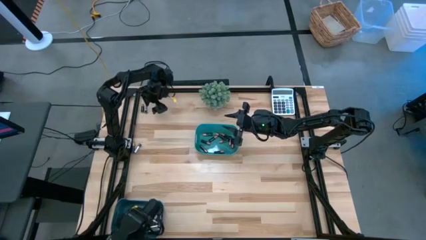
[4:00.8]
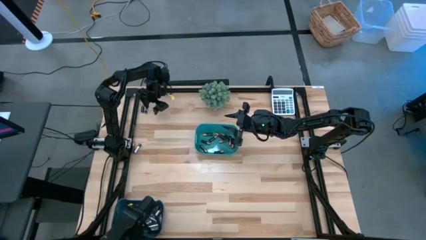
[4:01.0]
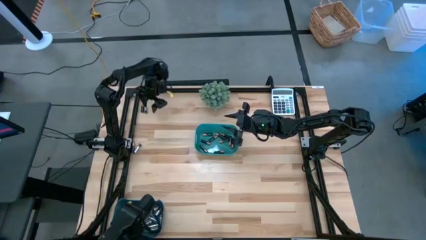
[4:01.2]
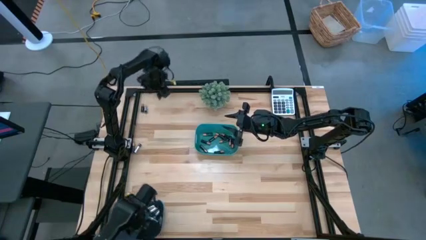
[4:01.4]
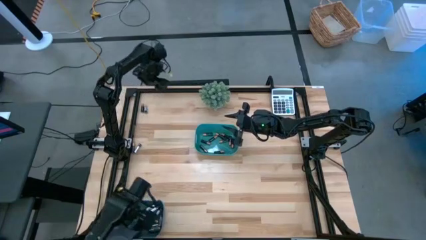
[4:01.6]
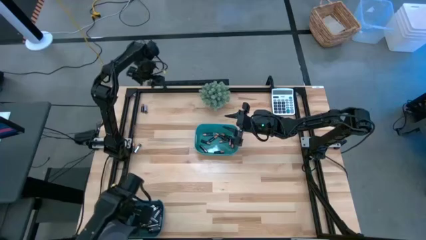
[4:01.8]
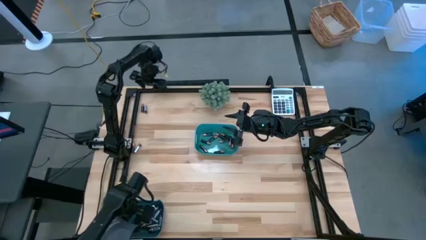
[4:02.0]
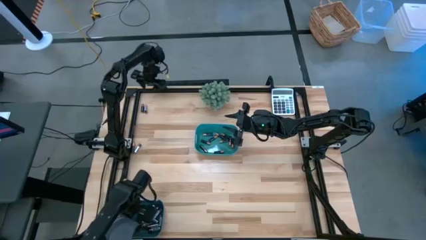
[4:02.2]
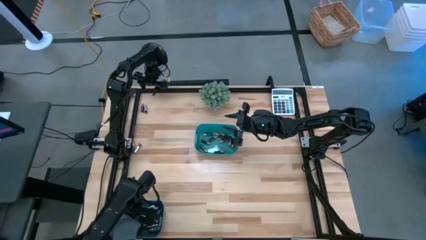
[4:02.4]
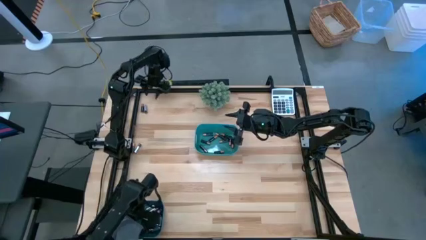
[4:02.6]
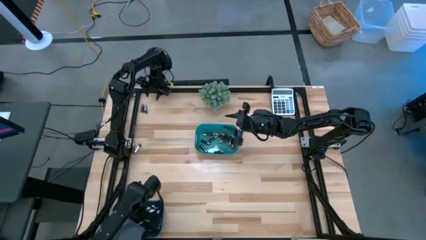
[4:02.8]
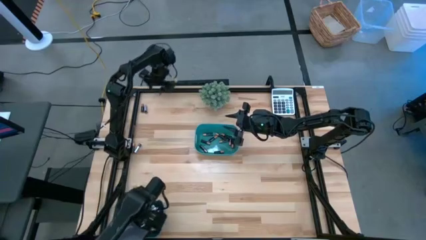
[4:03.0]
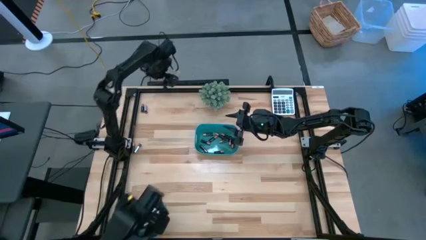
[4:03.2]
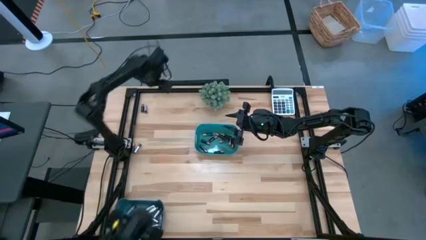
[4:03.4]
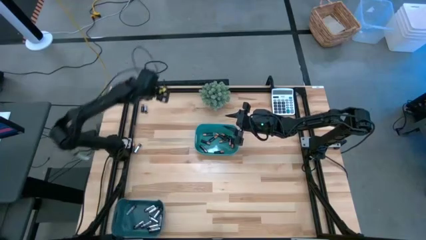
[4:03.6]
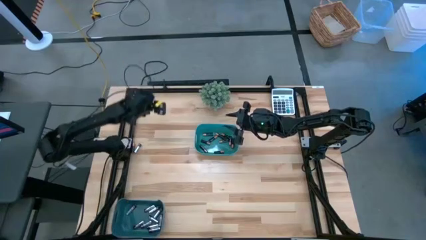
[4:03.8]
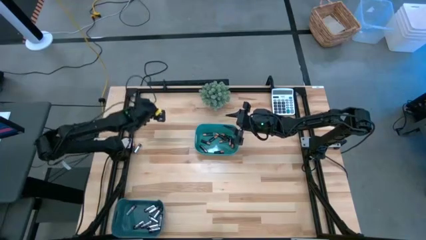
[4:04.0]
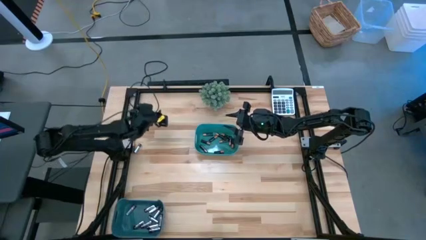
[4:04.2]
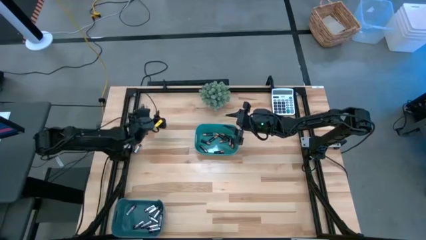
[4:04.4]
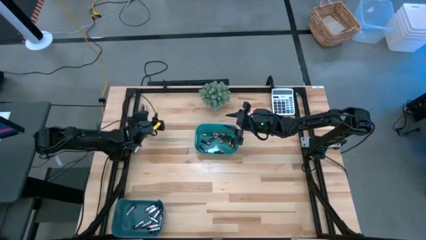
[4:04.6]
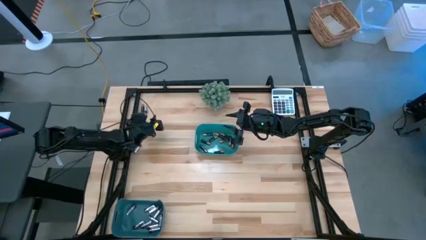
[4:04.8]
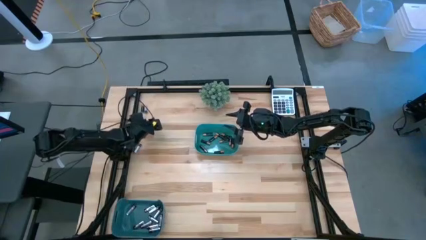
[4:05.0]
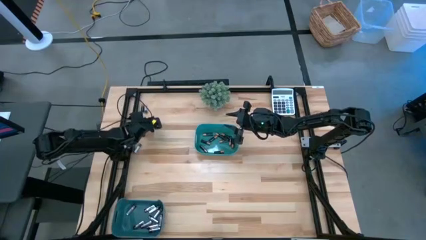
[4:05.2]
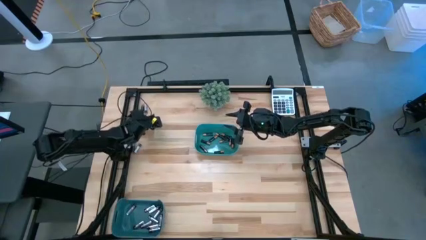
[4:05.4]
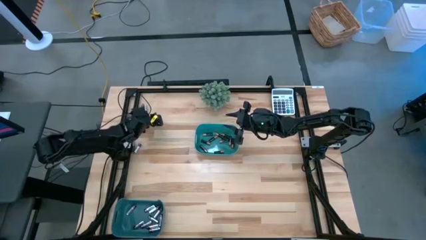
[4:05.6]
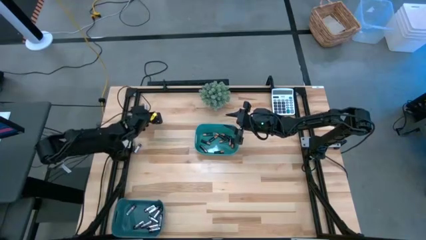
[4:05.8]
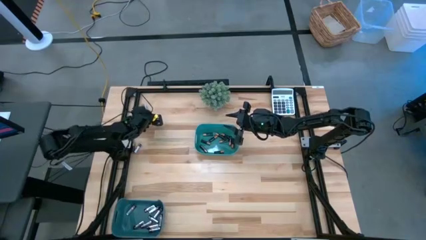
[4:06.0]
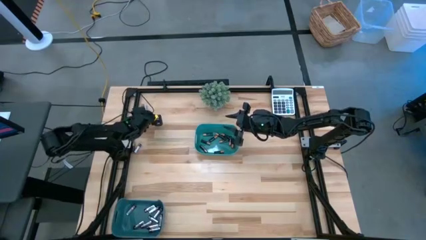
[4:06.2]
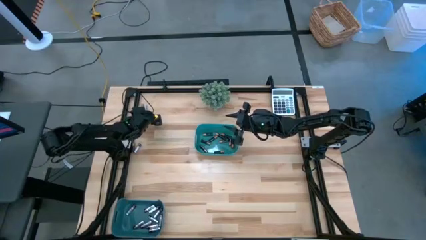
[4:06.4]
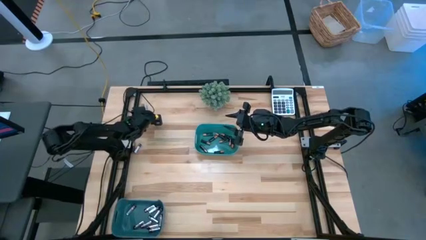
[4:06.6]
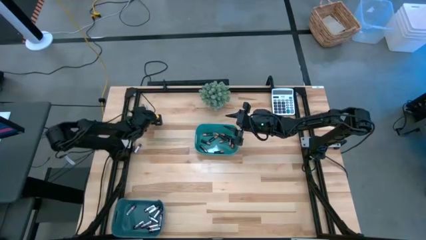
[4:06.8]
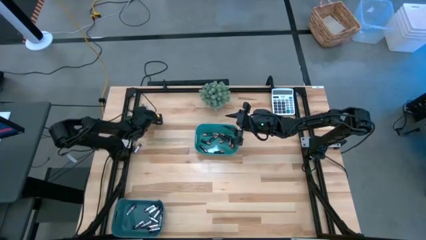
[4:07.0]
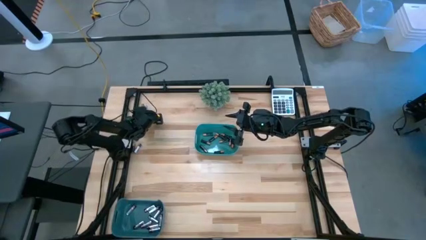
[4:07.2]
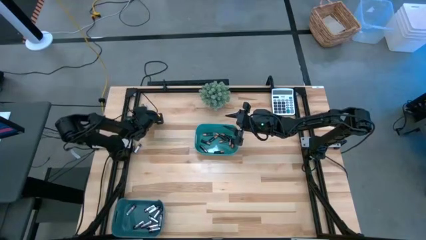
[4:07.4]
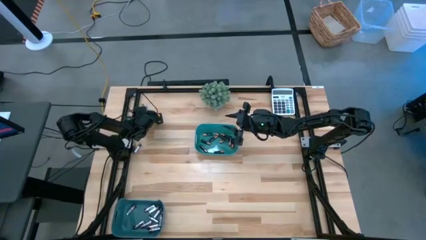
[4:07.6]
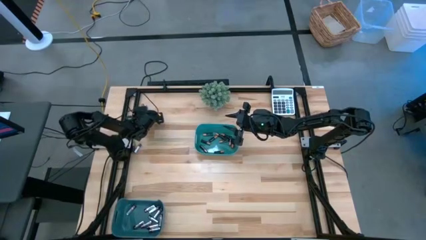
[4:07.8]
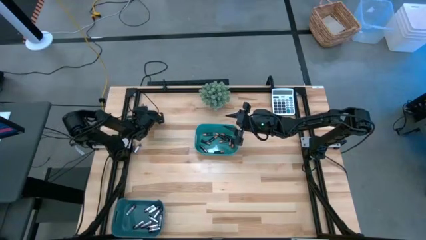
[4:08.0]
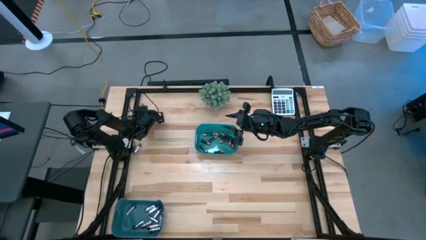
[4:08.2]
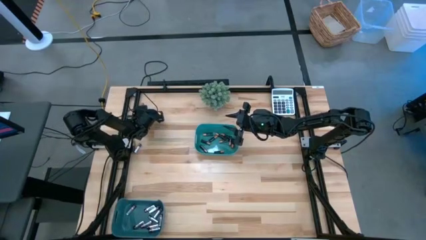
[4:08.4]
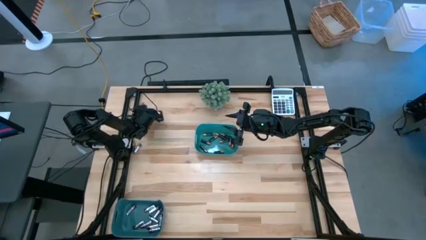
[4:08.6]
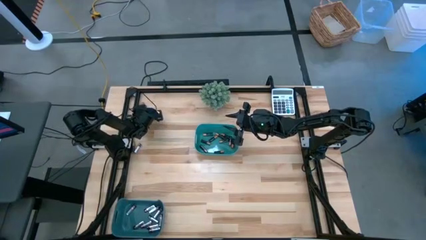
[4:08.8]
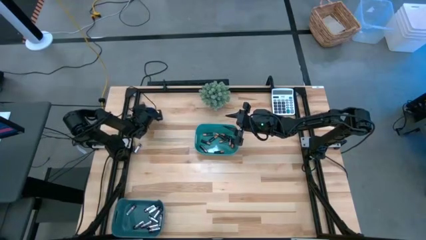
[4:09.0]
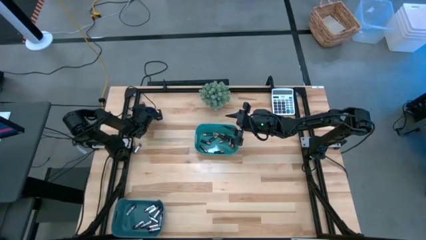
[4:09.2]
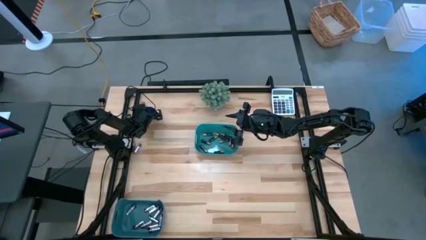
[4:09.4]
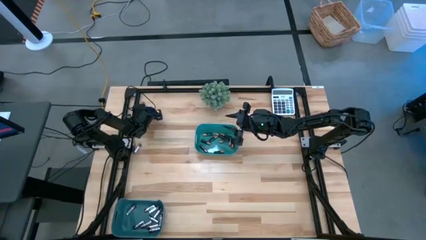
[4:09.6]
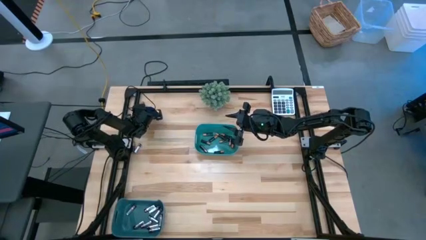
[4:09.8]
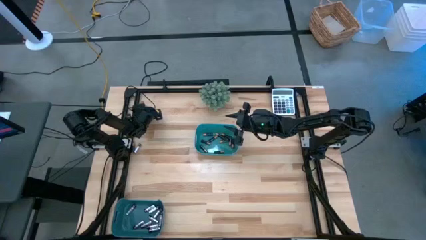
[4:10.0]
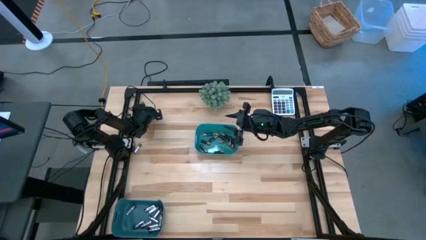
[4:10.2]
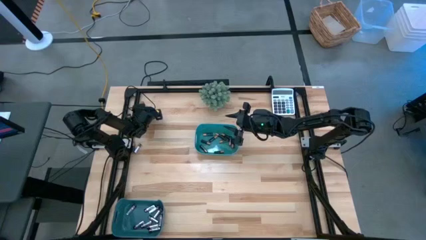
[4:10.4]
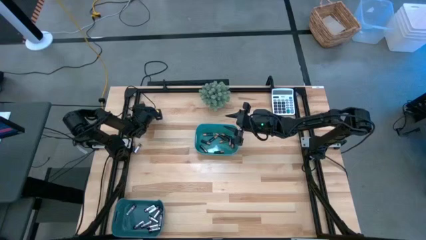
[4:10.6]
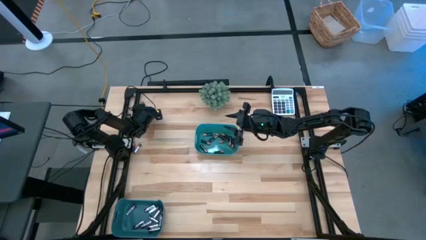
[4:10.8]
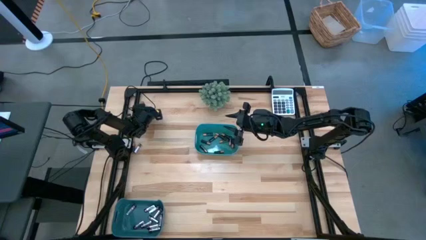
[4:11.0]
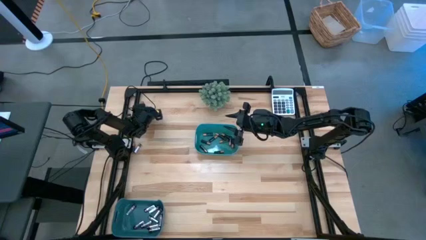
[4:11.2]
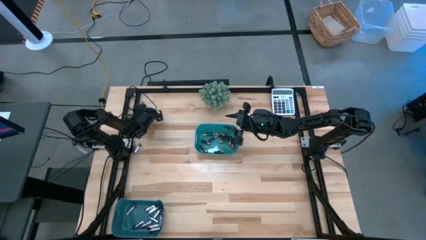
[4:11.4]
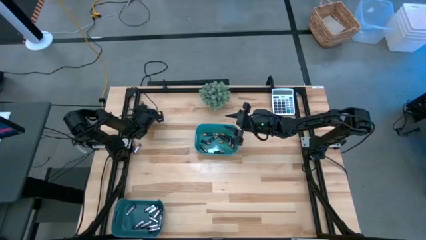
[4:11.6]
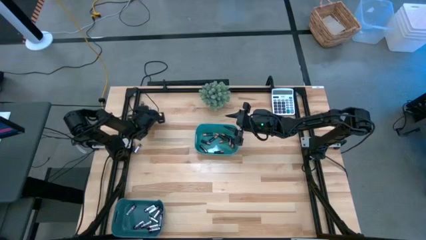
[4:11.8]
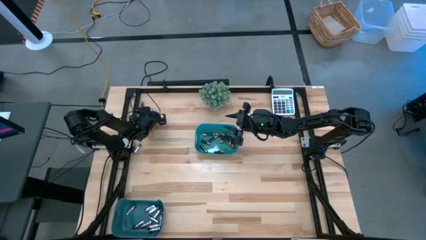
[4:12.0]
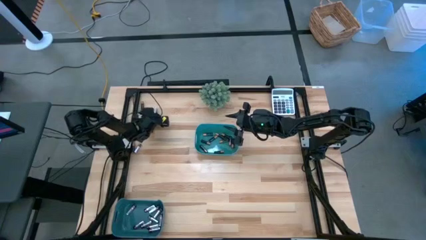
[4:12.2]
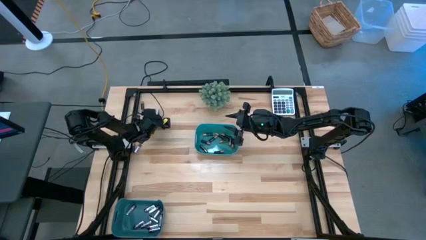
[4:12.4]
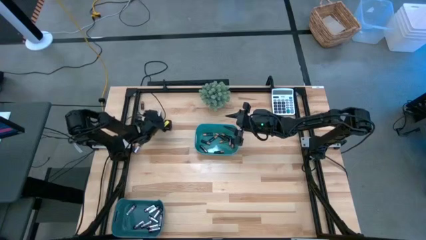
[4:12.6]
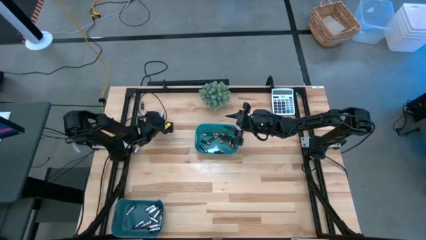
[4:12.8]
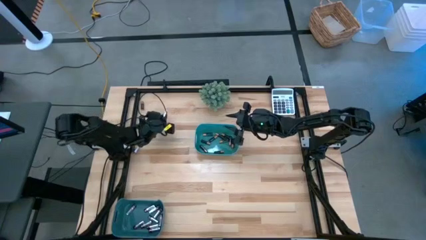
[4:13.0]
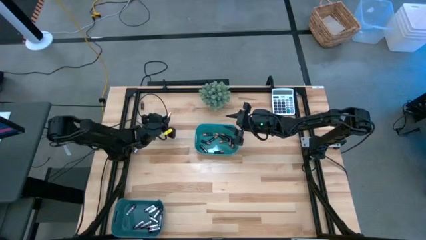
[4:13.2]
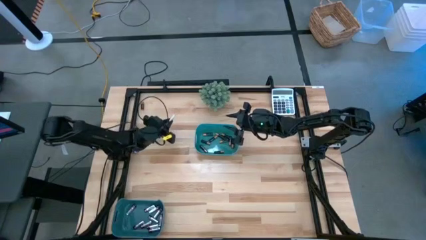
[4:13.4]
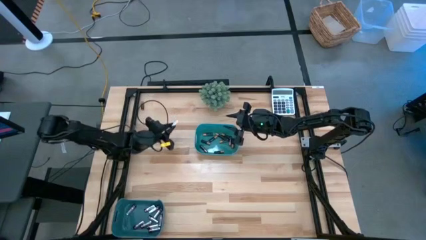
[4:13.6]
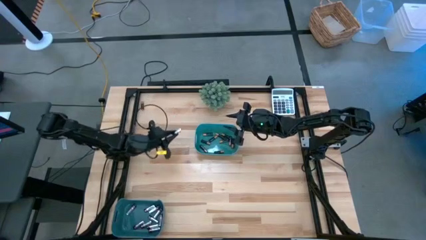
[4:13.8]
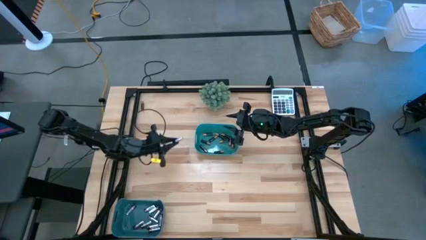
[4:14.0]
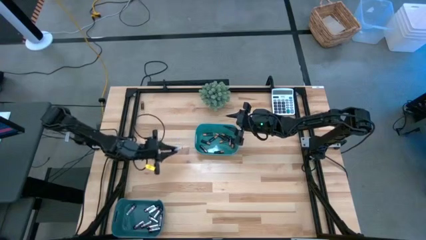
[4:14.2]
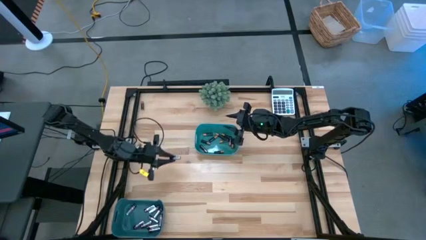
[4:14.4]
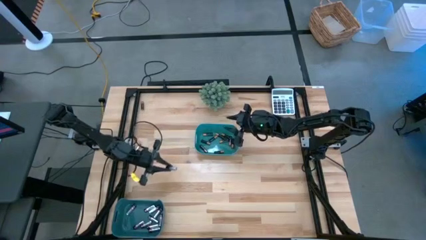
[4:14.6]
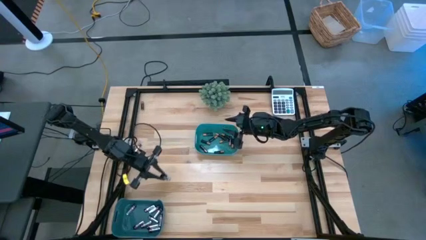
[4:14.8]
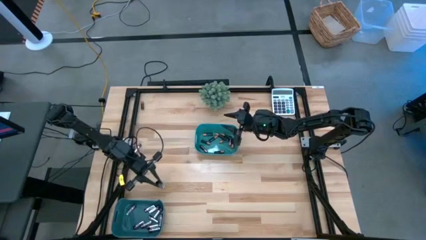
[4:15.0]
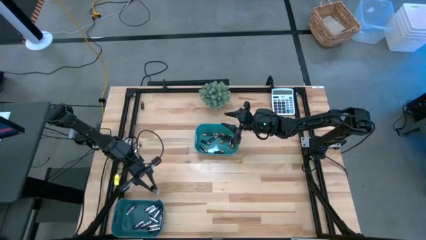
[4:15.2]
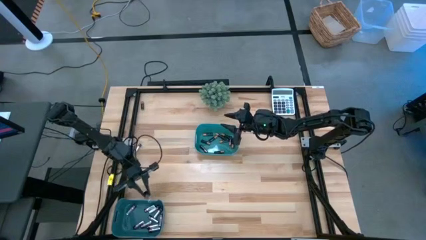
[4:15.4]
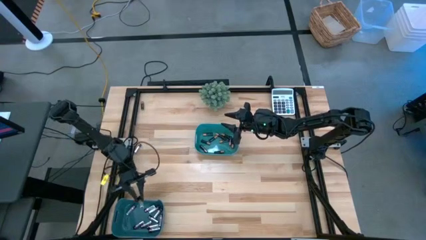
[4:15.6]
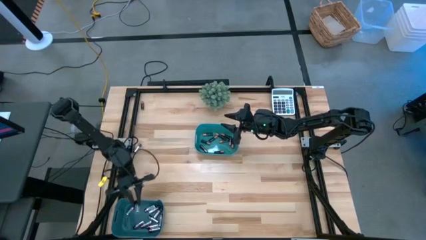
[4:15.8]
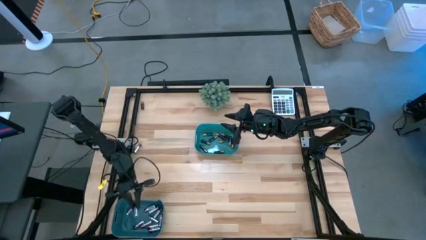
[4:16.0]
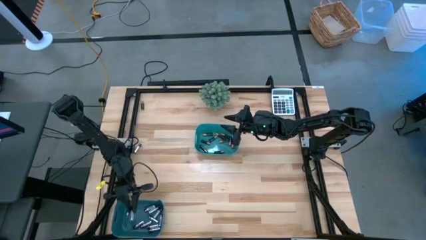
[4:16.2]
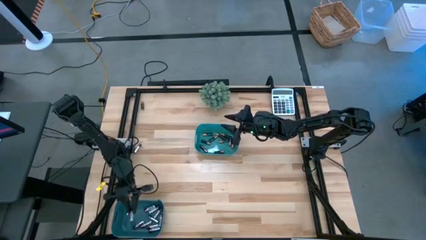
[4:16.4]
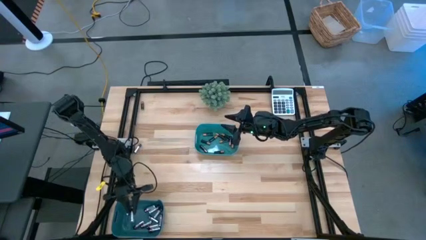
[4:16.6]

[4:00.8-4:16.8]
Task: Sort batteries
Put the silver battery into the blue bin
